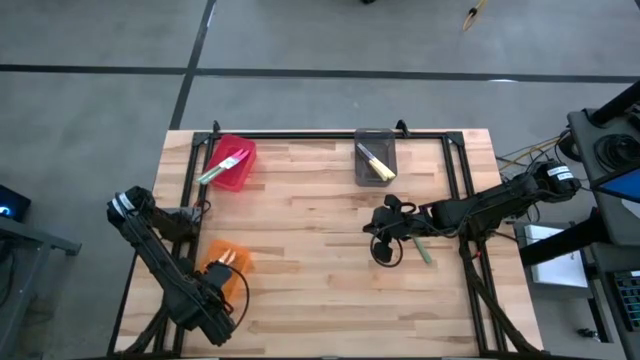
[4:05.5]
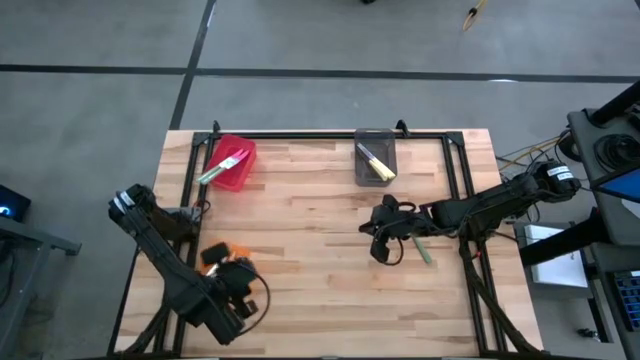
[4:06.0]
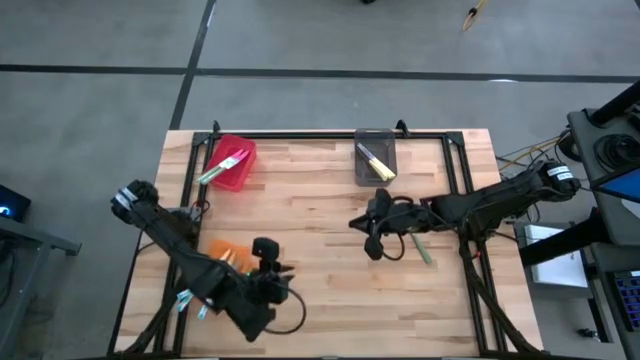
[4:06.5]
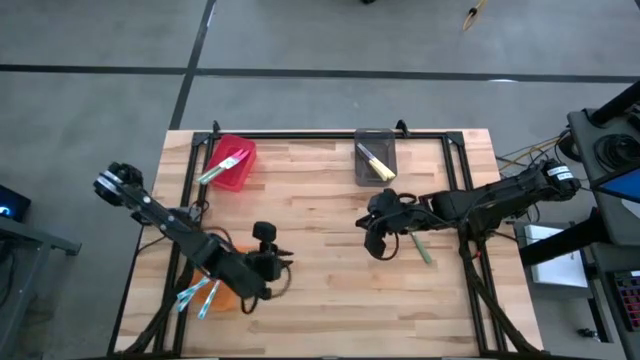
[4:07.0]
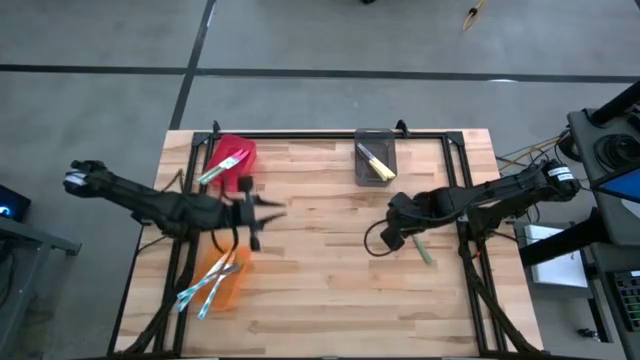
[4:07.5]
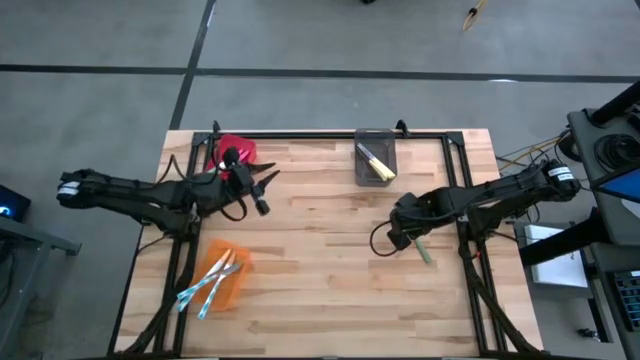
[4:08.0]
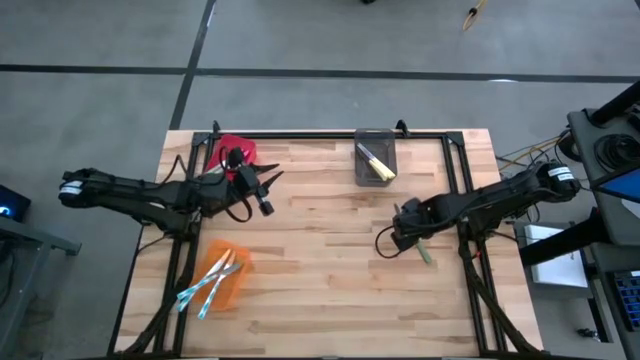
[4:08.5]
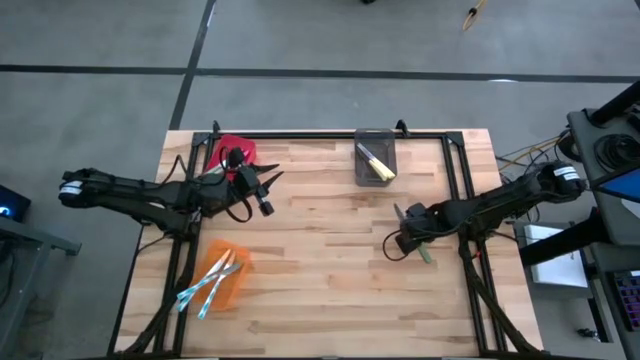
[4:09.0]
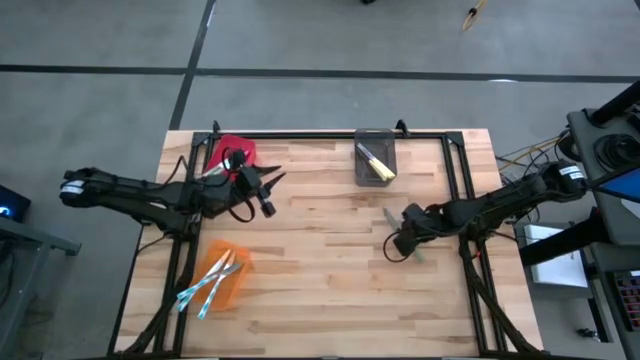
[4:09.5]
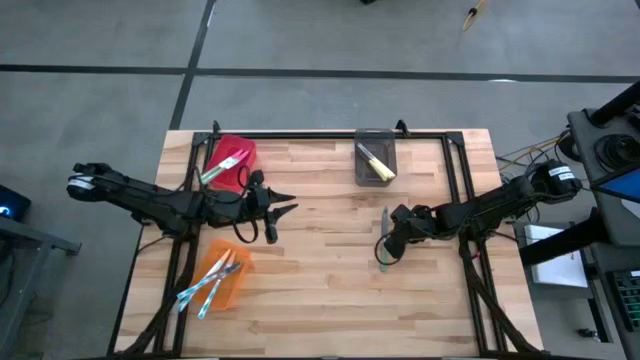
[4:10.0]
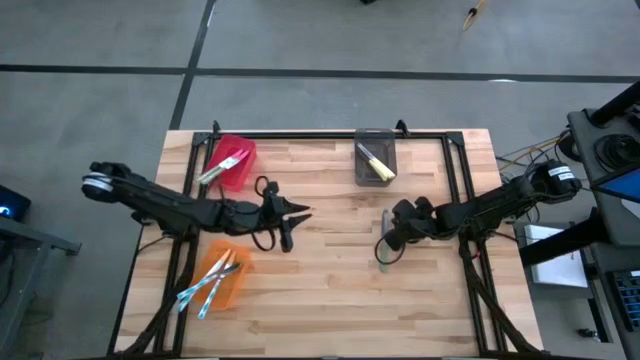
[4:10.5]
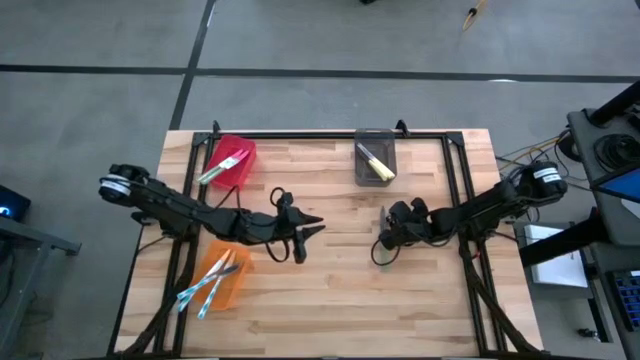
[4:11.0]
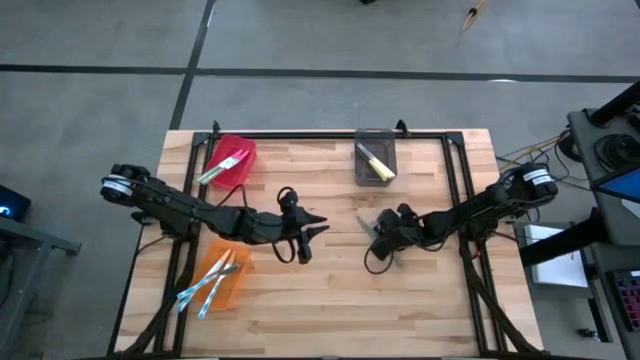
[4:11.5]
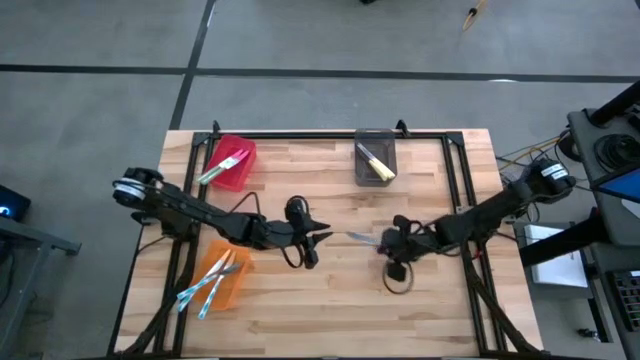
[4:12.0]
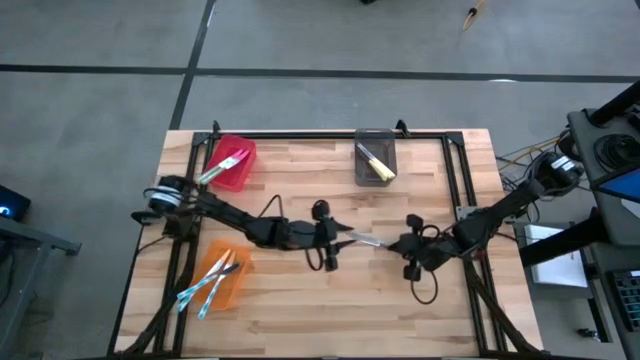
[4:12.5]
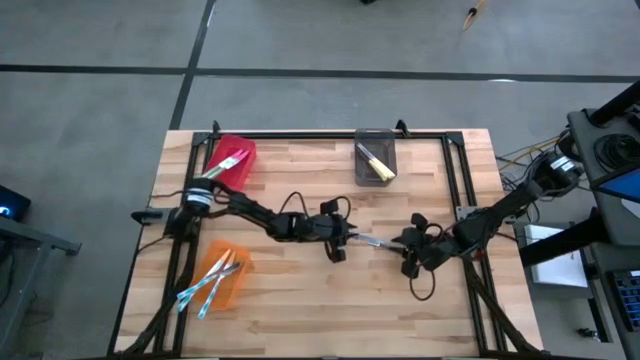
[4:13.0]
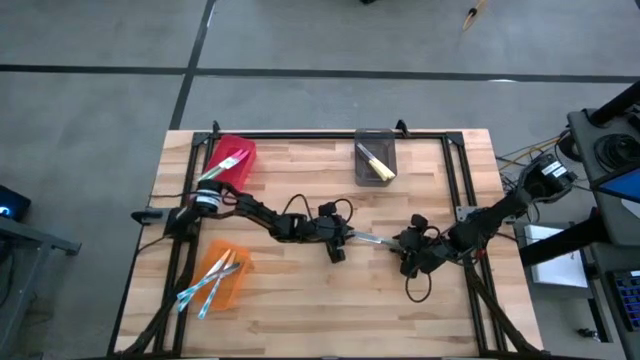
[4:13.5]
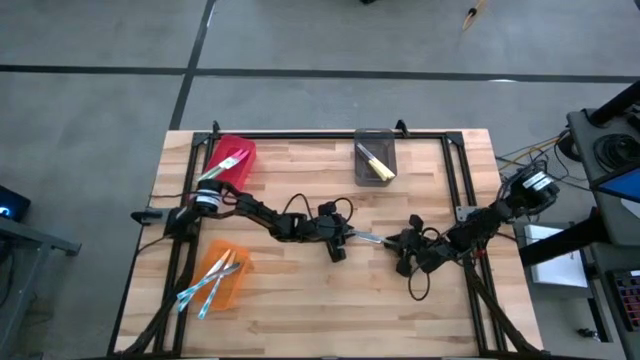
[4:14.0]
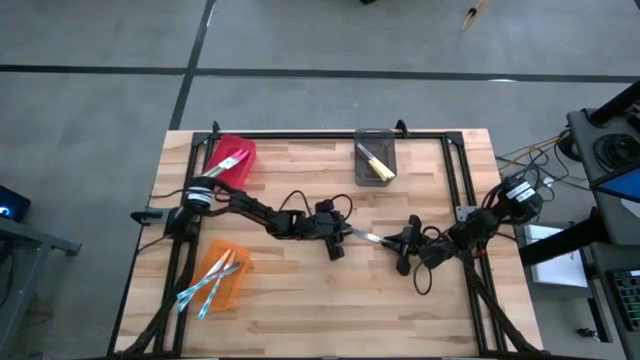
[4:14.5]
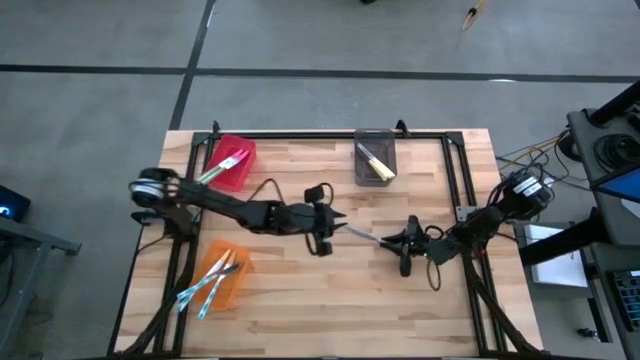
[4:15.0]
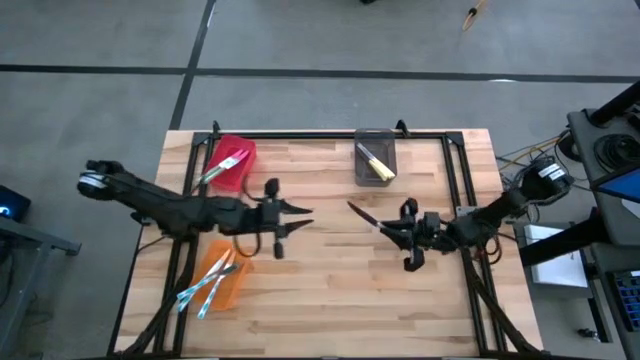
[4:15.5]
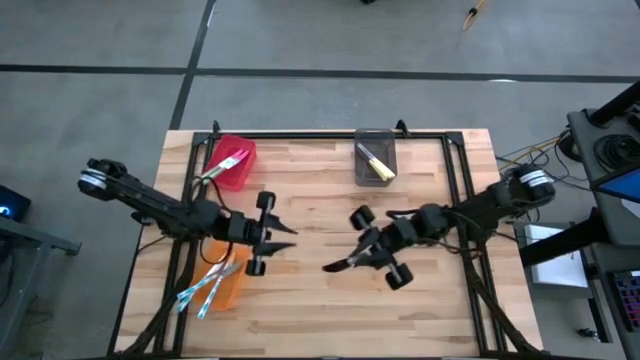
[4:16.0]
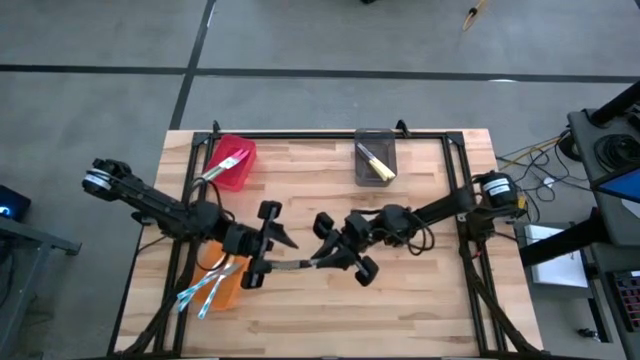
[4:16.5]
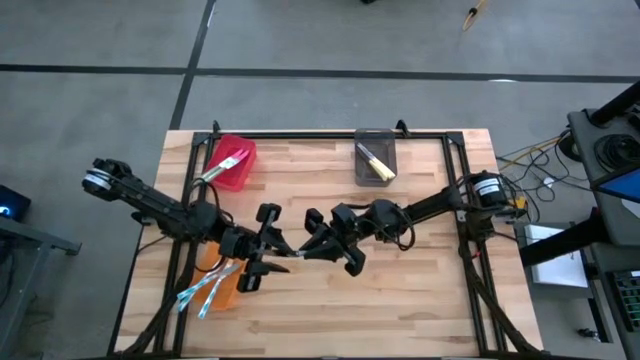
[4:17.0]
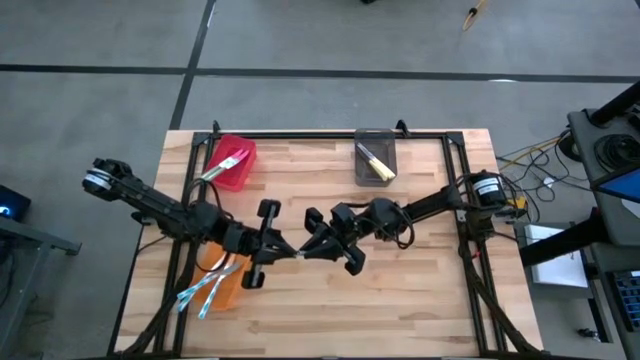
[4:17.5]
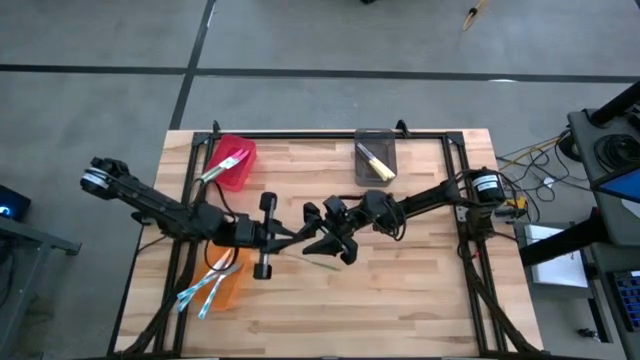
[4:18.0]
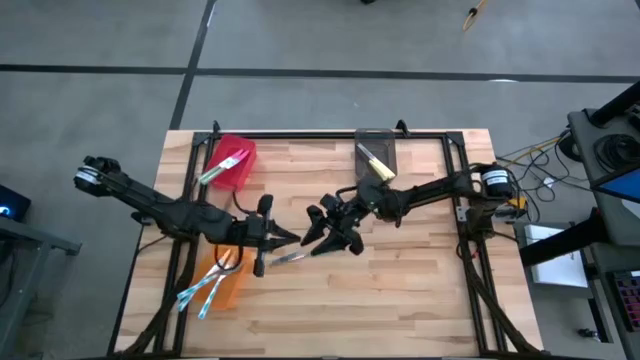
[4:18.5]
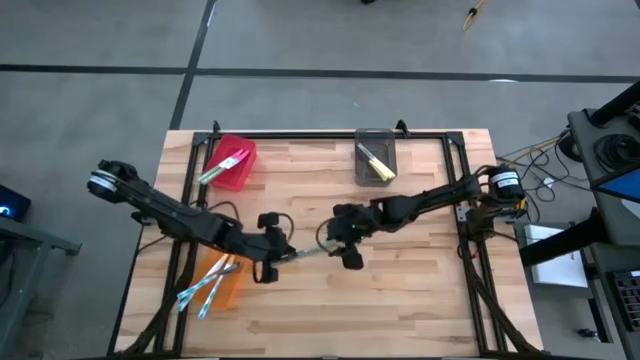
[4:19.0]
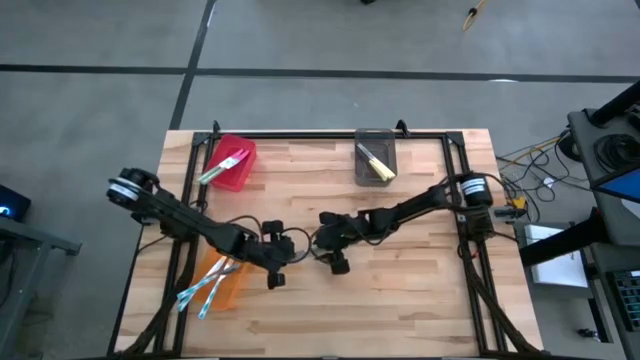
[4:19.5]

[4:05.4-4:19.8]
Task: Sort silverware by color (type)
Put the green knife into the red bin

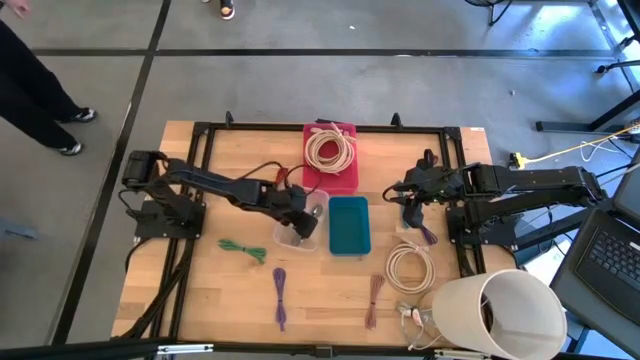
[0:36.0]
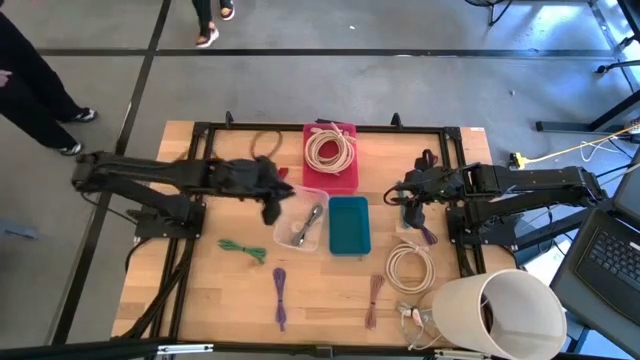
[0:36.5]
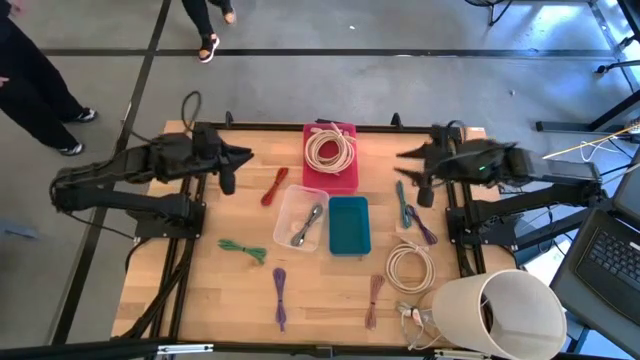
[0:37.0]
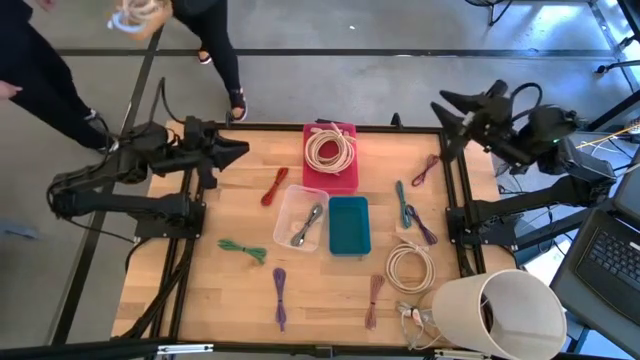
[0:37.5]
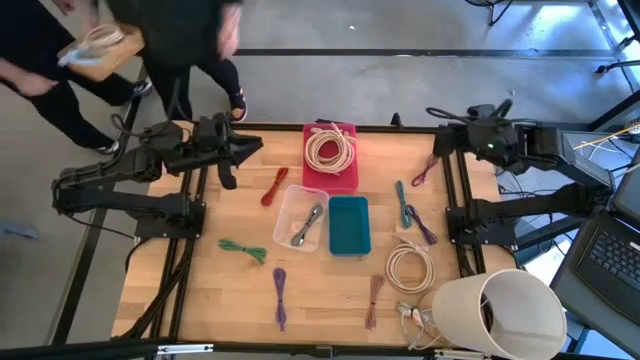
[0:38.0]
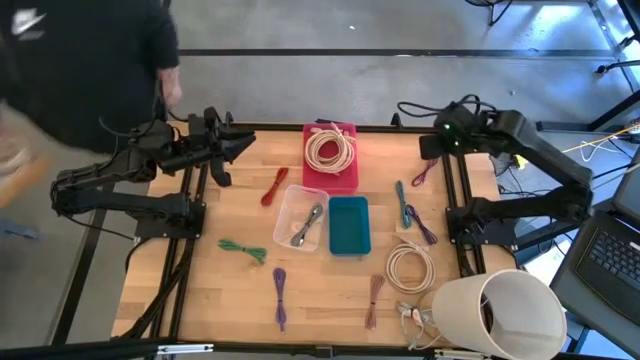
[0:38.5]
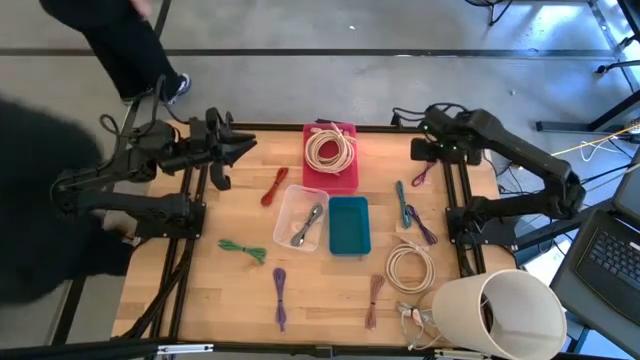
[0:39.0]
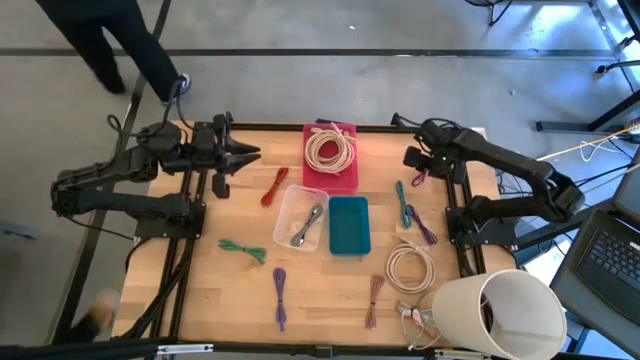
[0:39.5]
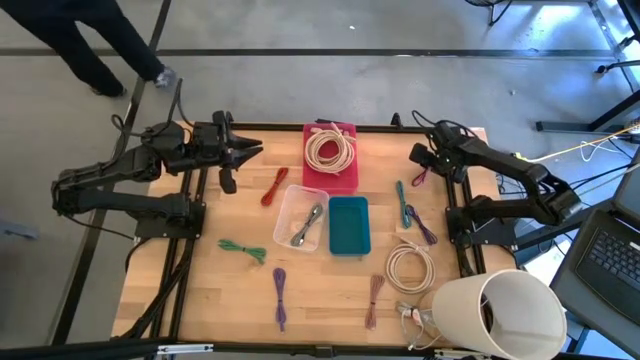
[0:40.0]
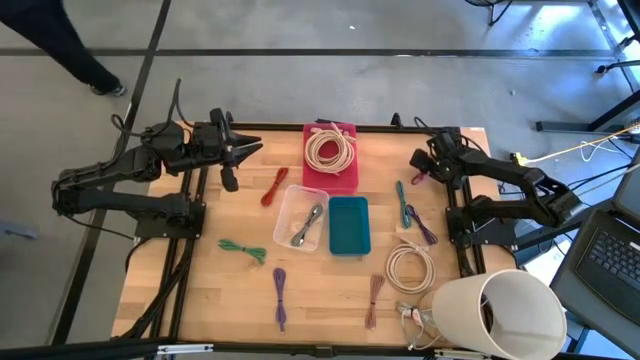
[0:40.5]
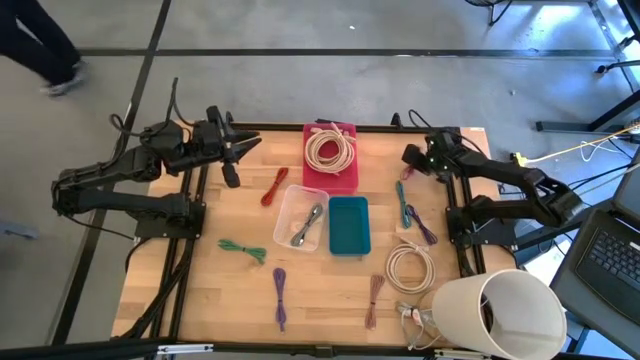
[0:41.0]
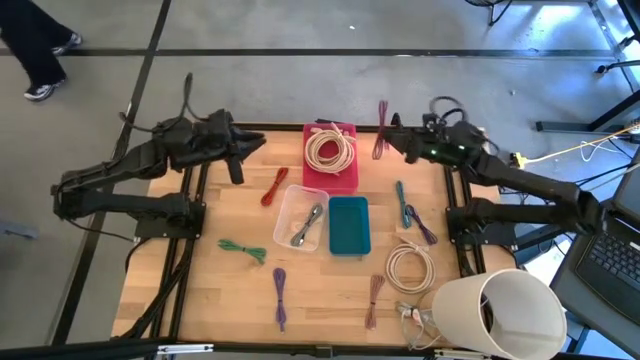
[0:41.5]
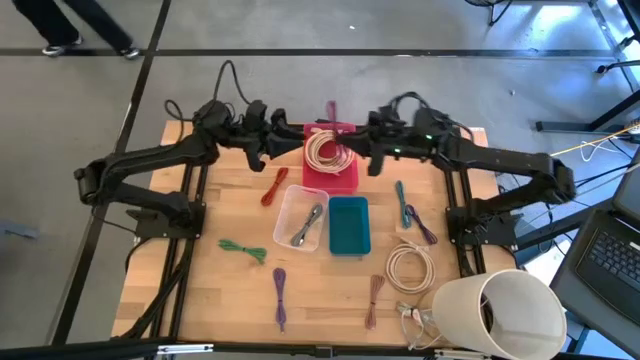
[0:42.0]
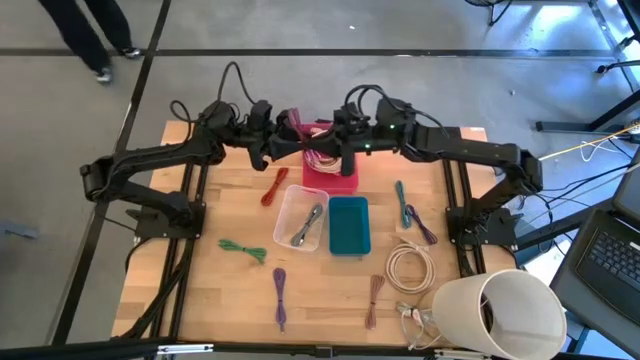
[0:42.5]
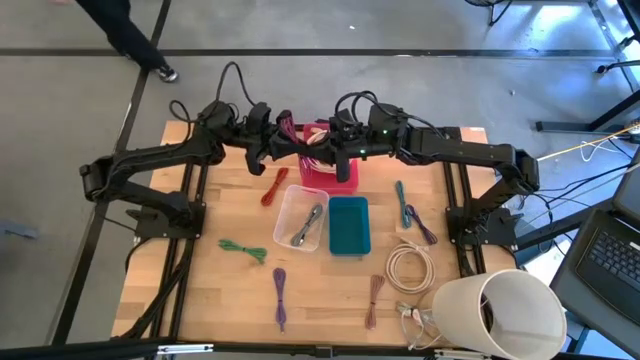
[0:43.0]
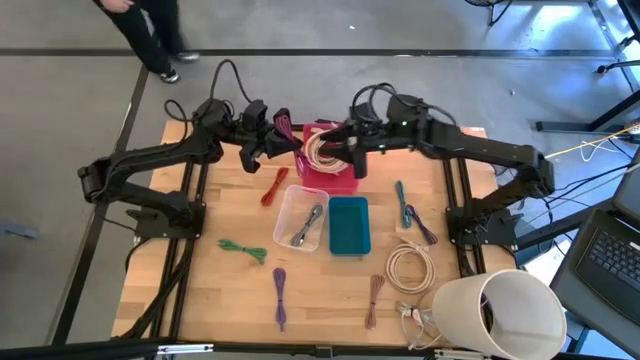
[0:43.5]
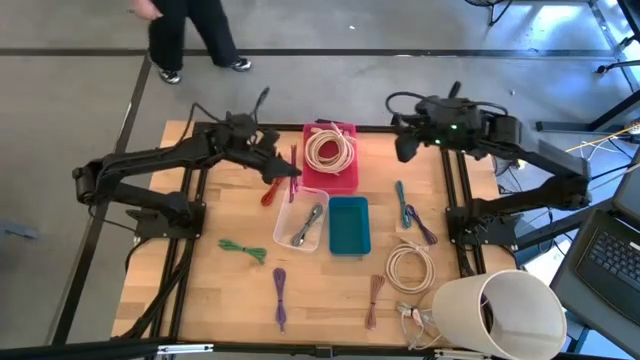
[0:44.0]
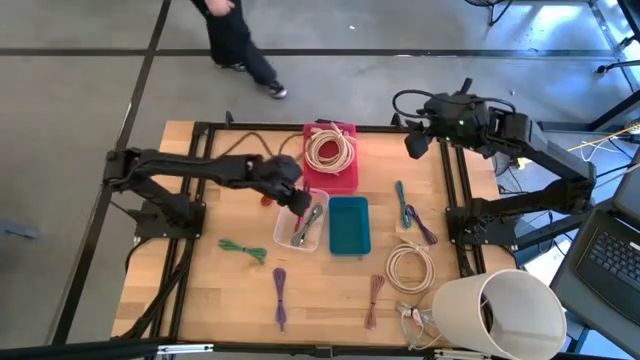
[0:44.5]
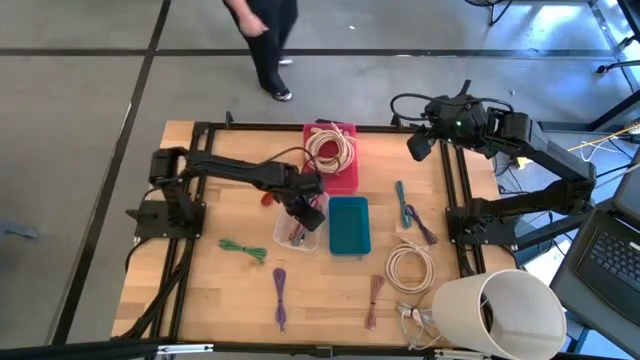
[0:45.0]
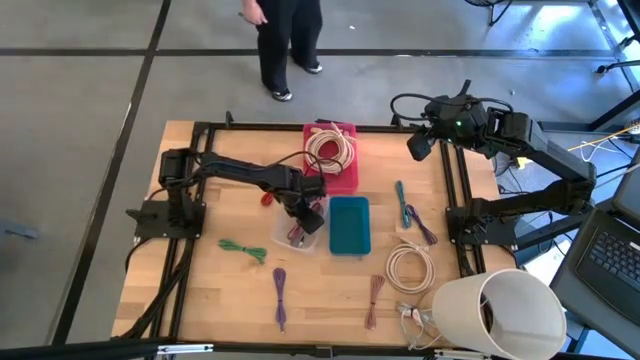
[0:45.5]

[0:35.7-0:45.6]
Task: Pick & Place USB Port
Put the black and pink charger cable into the transparent bin
